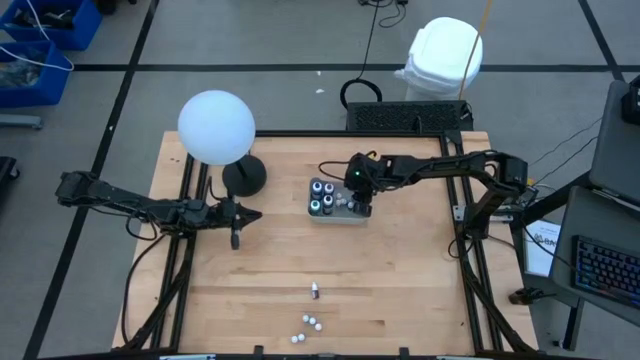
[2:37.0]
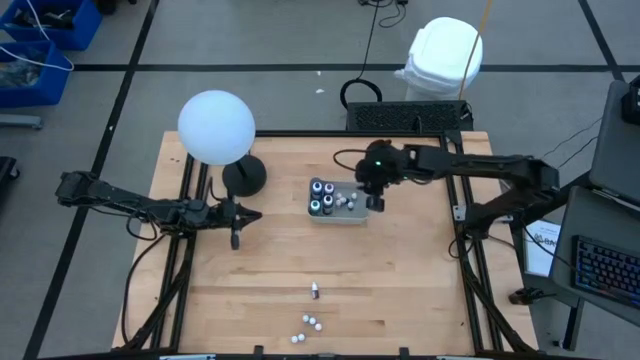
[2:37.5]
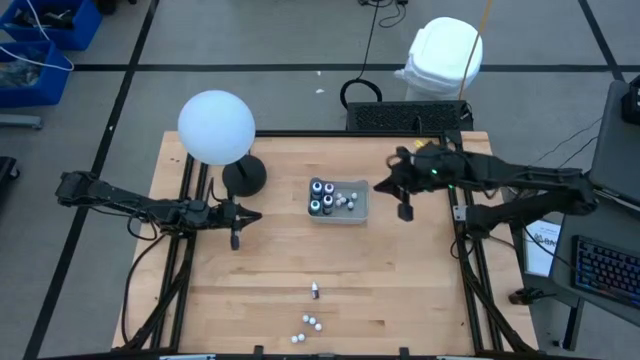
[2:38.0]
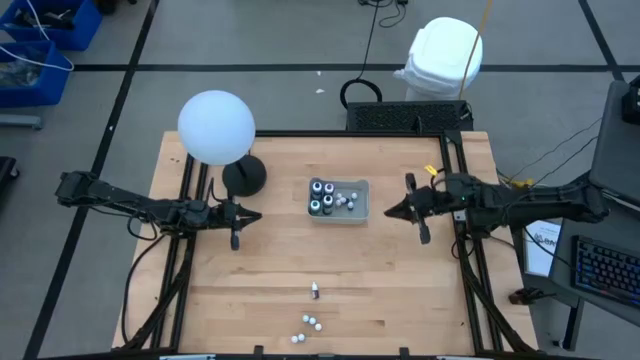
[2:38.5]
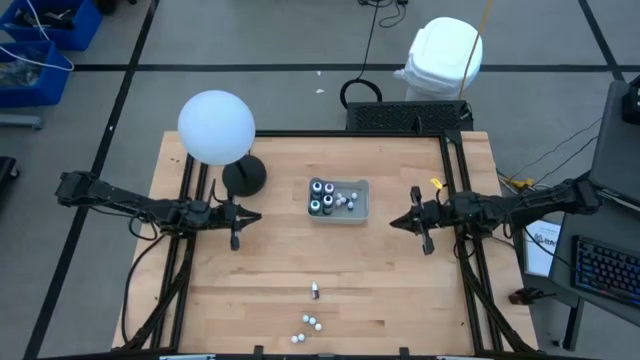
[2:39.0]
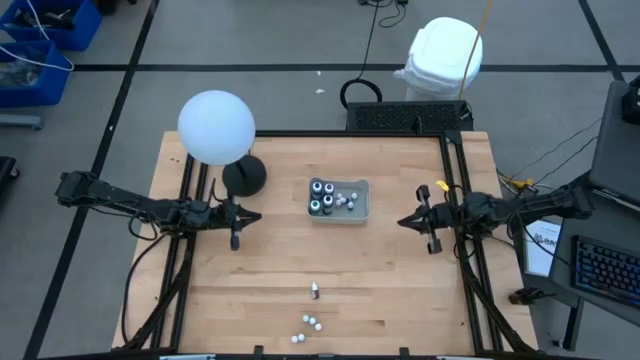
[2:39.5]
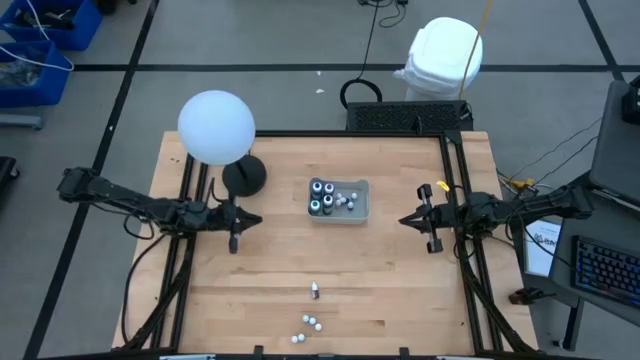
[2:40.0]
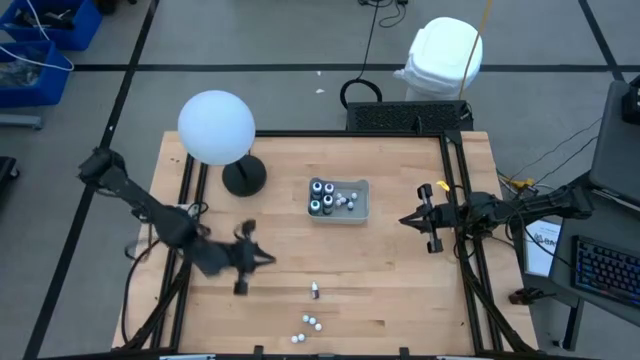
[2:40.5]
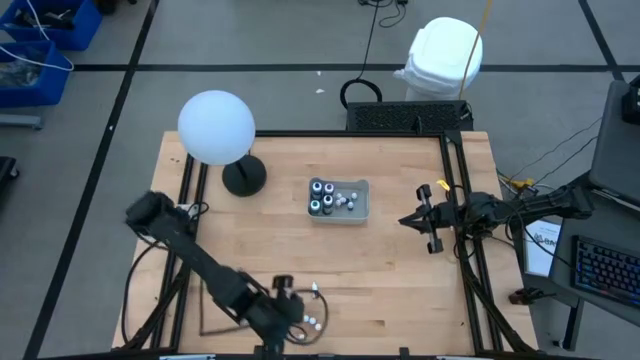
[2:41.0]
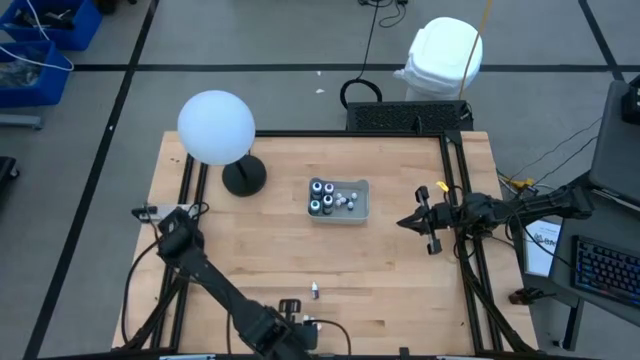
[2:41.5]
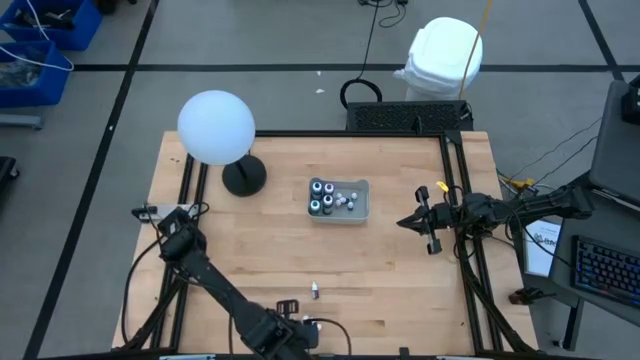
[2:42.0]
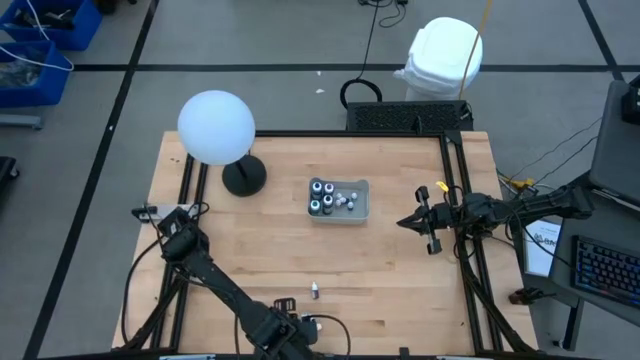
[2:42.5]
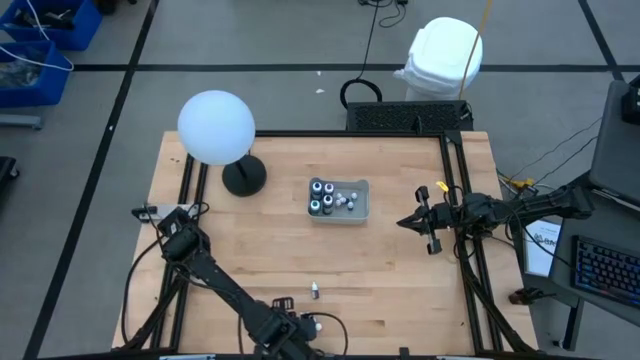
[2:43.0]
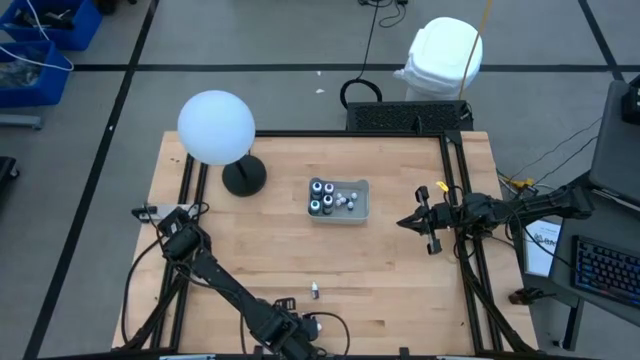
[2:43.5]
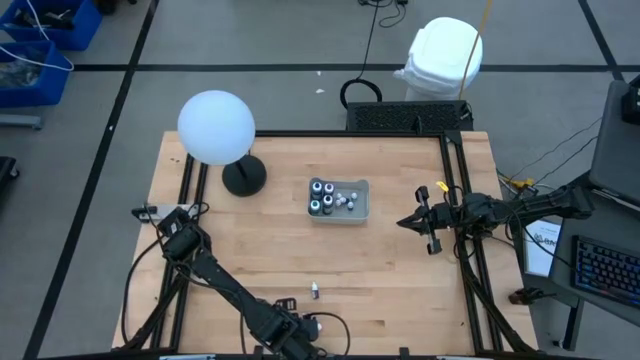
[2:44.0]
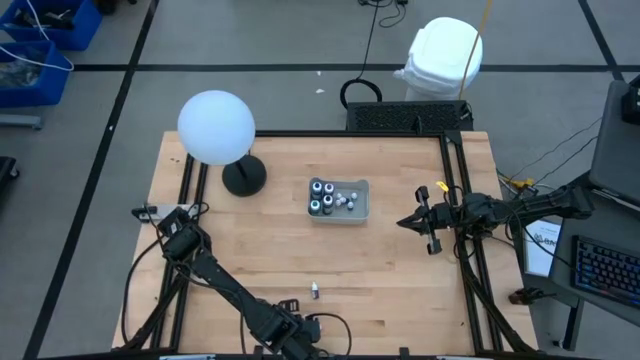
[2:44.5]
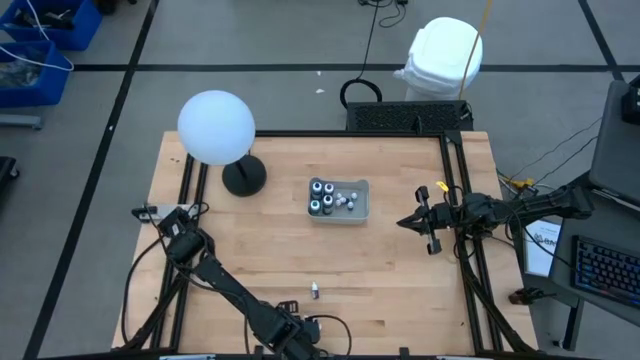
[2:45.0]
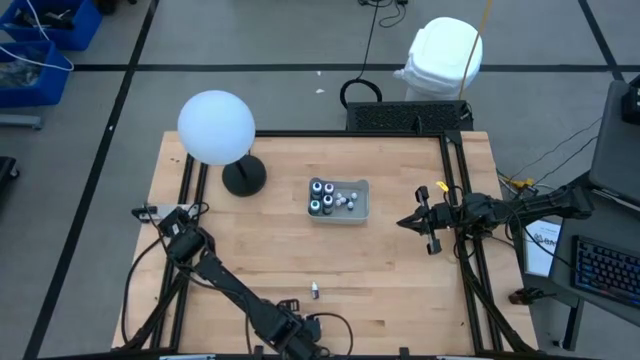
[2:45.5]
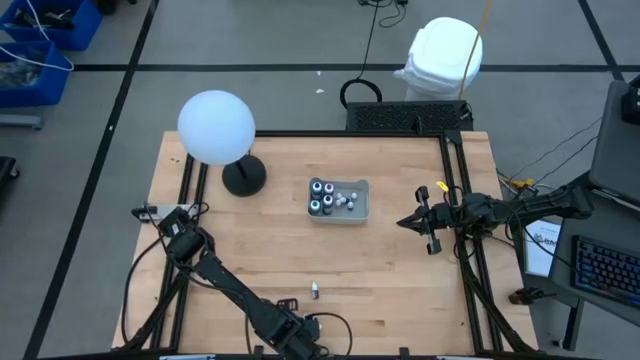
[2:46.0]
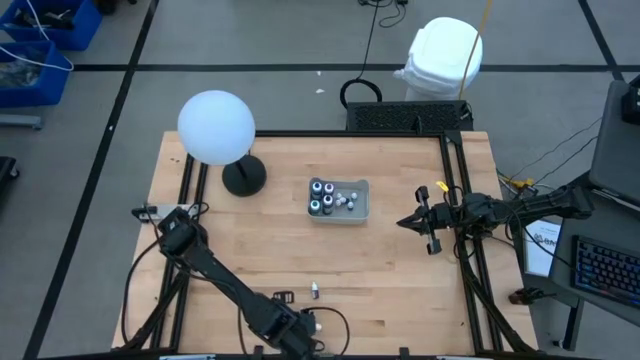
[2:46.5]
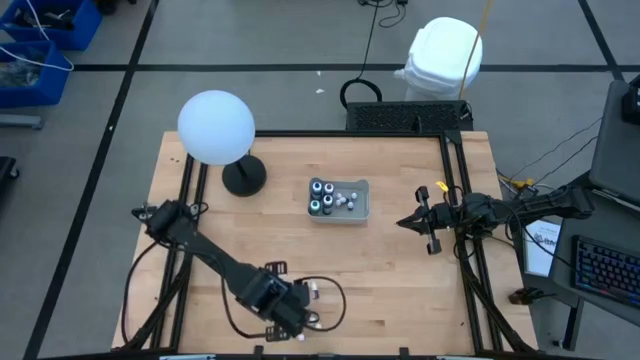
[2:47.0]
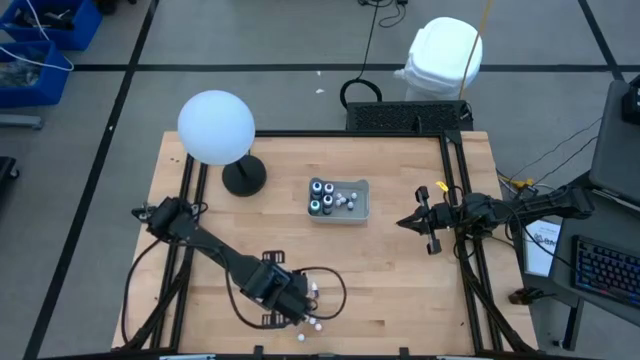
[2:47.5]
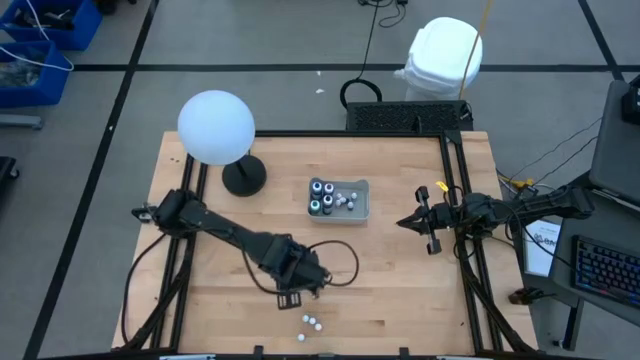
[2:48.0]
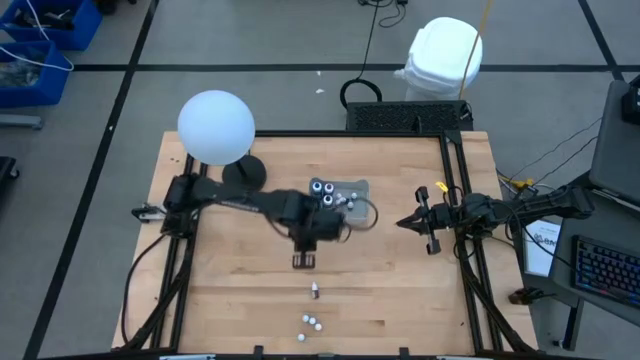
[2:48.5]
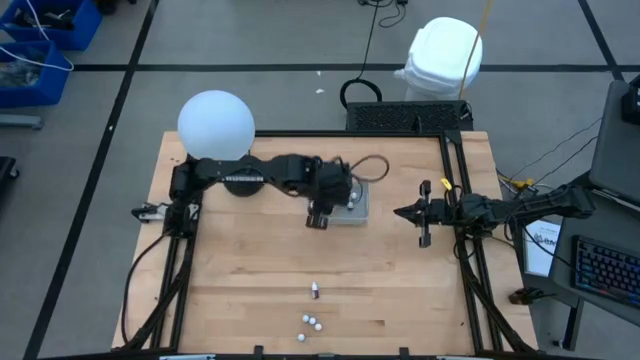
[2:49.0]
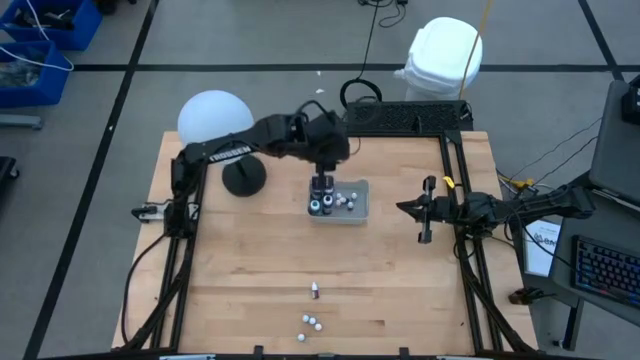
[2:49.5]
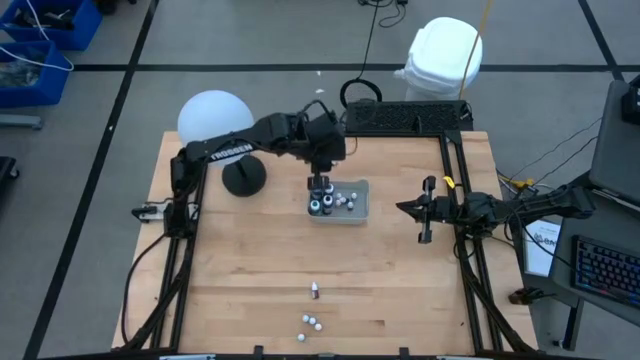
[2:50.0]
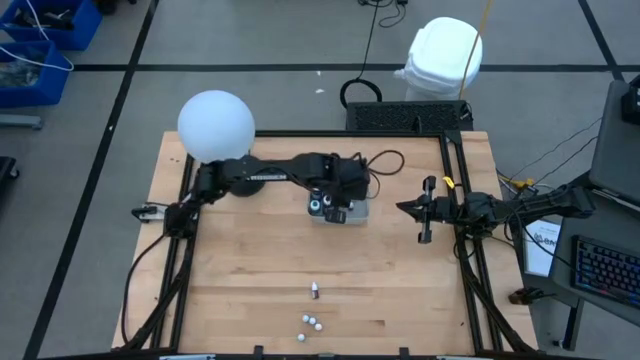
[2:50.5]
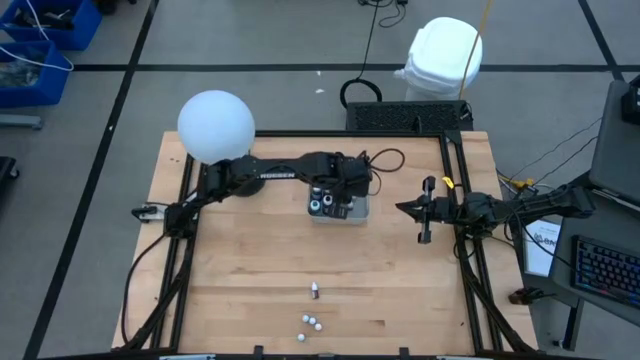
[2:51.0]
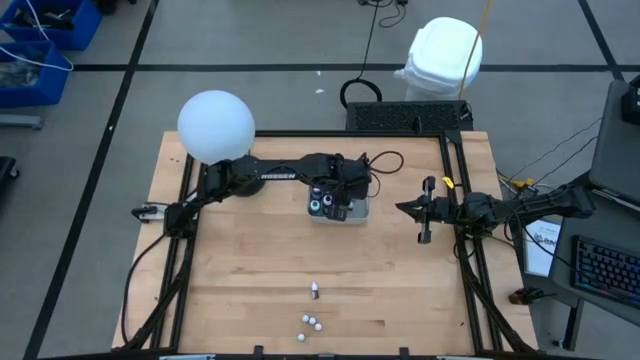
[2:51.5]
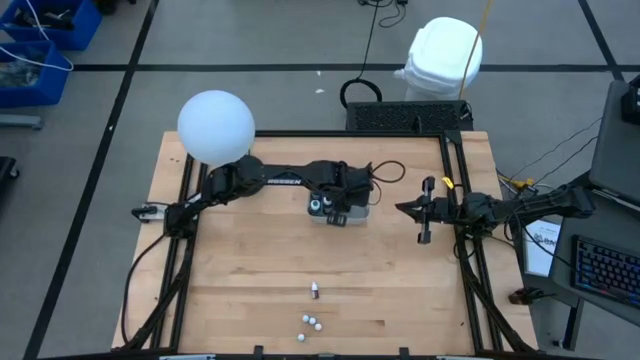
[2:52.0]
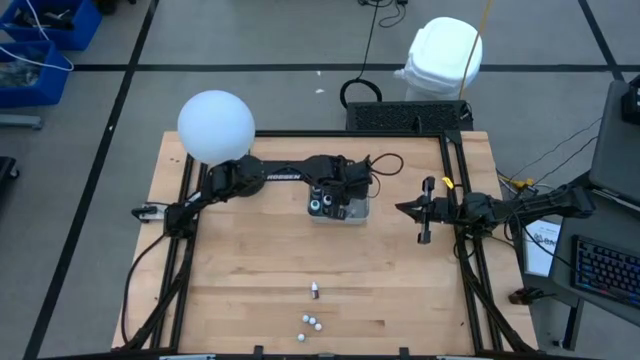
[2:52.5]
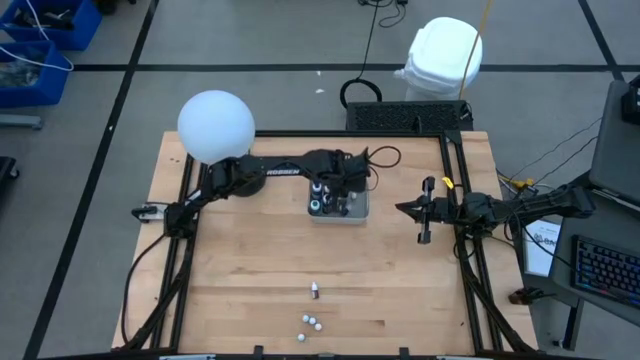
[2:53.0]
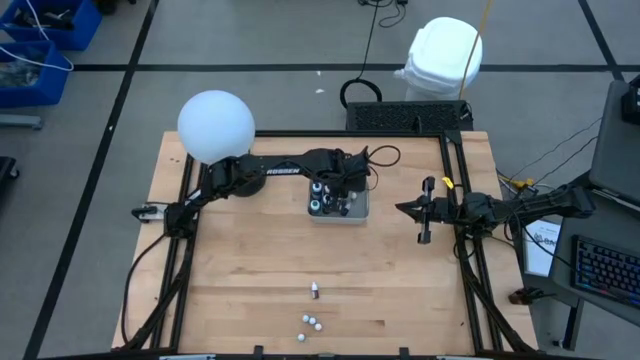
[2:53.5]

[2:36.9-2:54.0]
Task: Pick & Place food coloring
Put the left small orange food coloring bottle into the gray bin

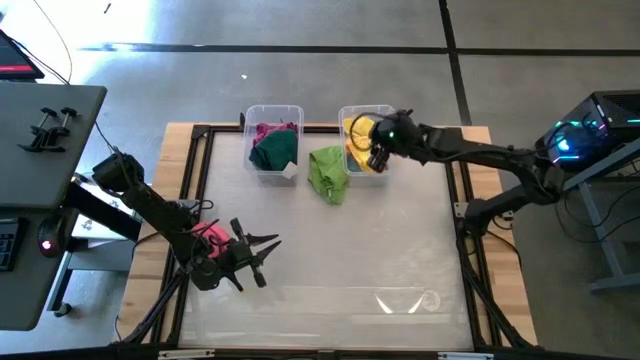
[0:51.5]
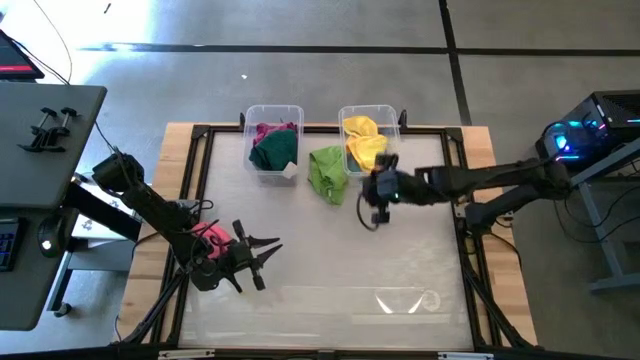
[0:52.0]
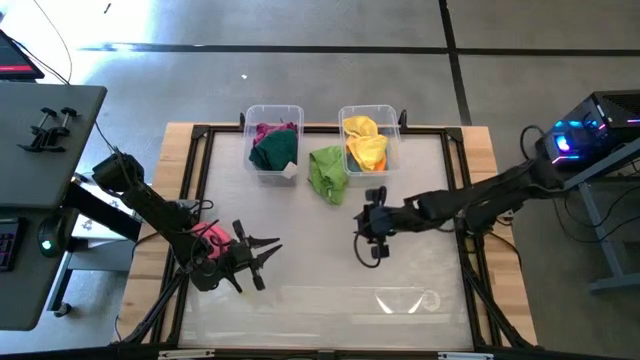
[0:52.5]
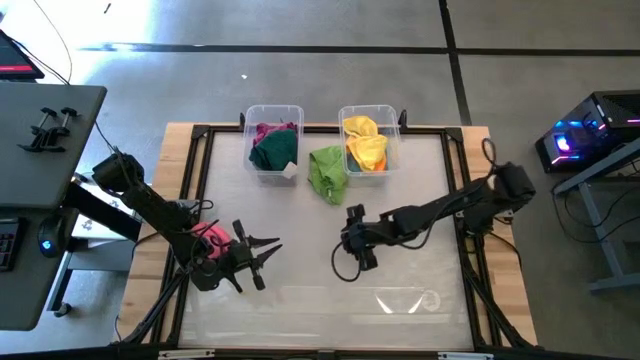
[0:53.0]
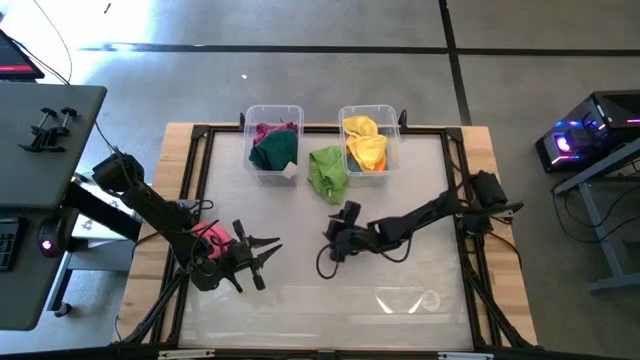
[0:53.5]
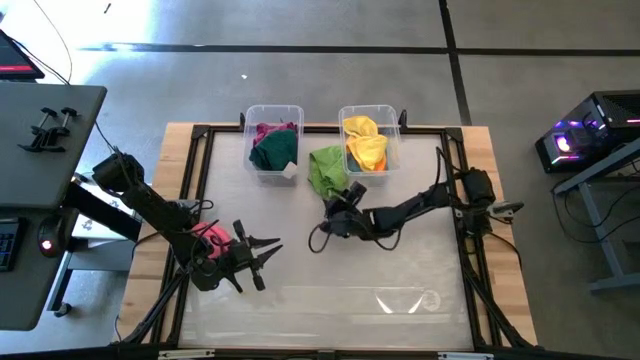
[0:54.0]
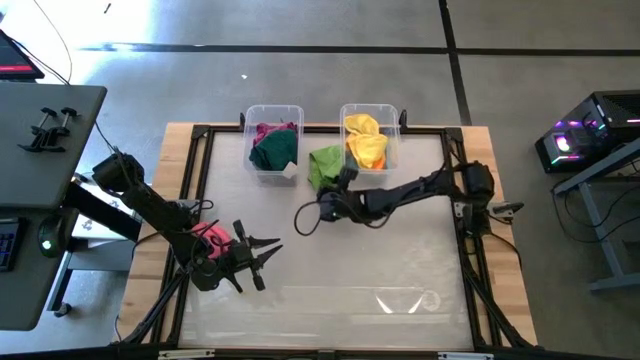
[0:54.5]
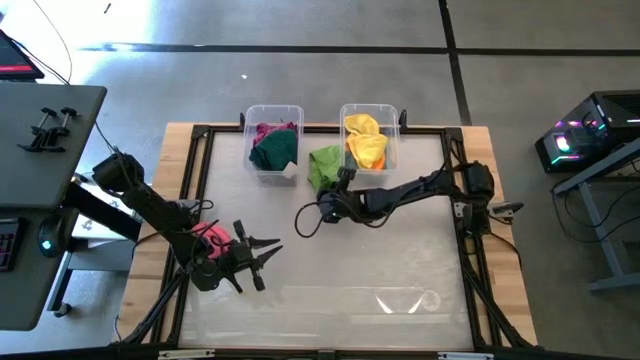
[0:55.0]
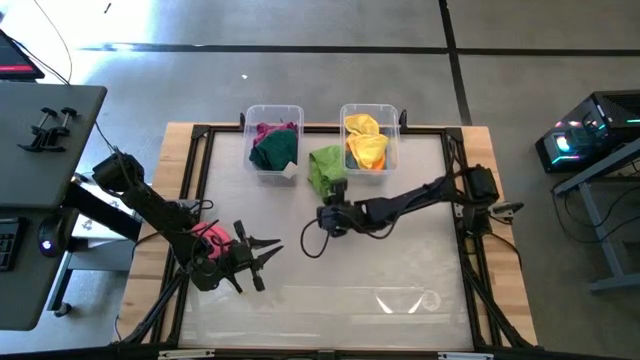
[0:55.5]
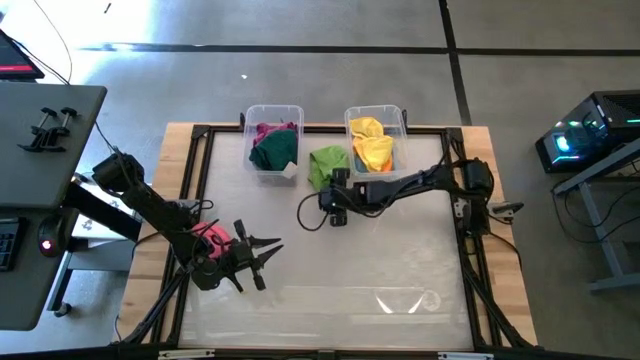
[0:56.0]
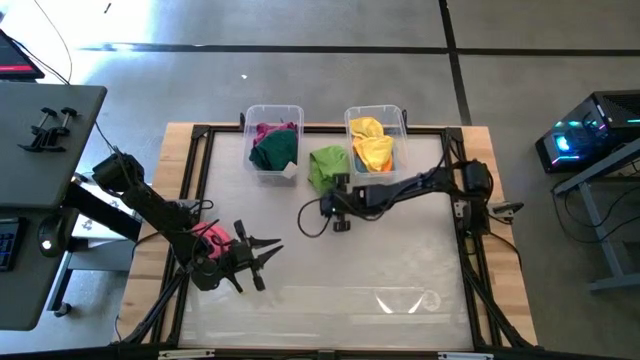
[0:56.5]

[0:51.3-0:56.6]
Task: Sort towels by color in basket
Put the green microfiber cloth into the right transparent bin
